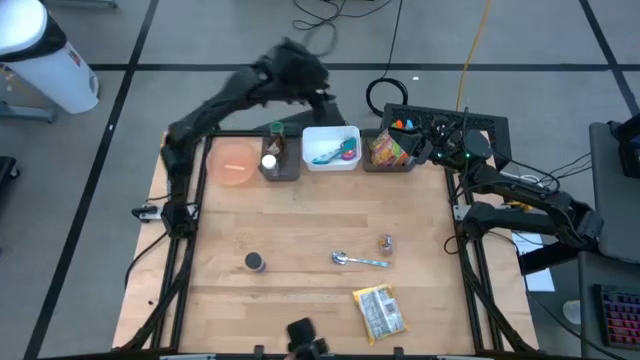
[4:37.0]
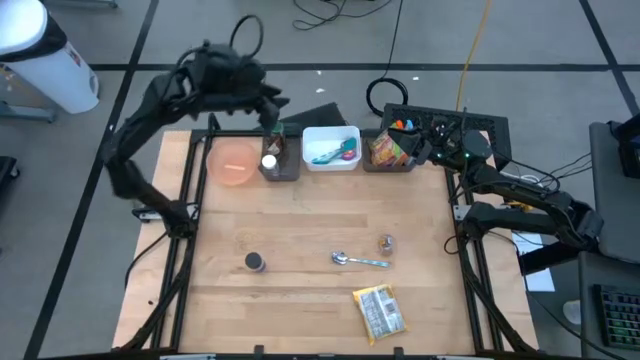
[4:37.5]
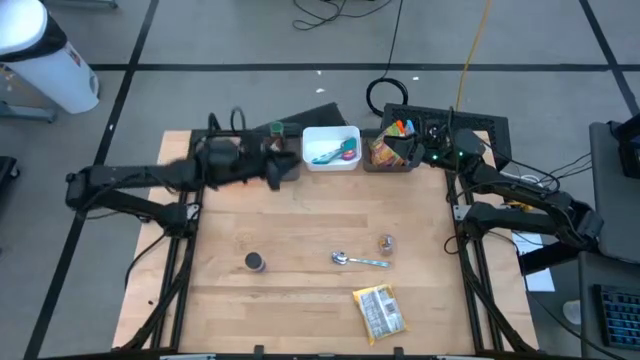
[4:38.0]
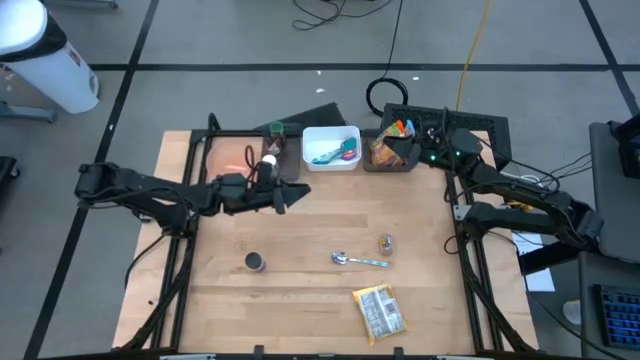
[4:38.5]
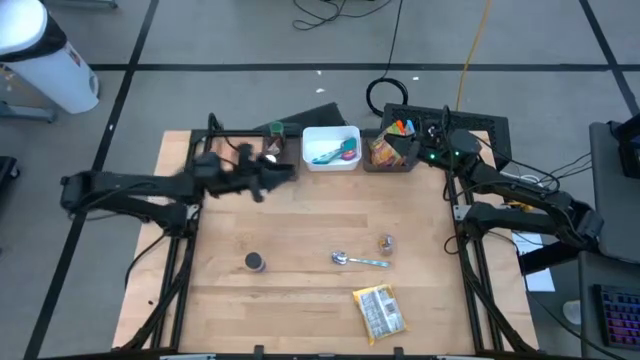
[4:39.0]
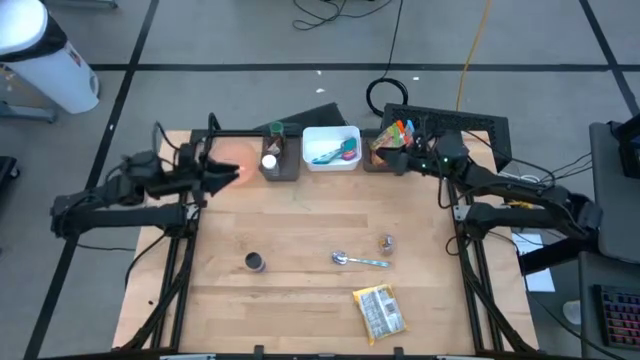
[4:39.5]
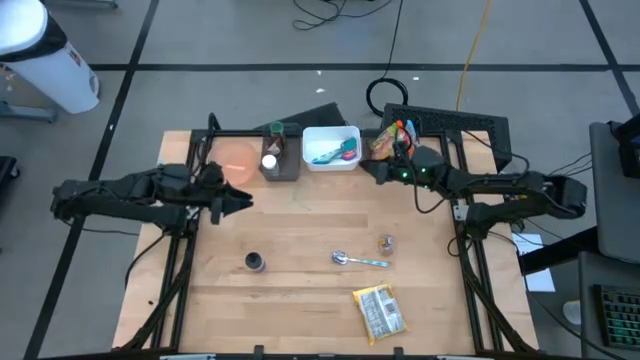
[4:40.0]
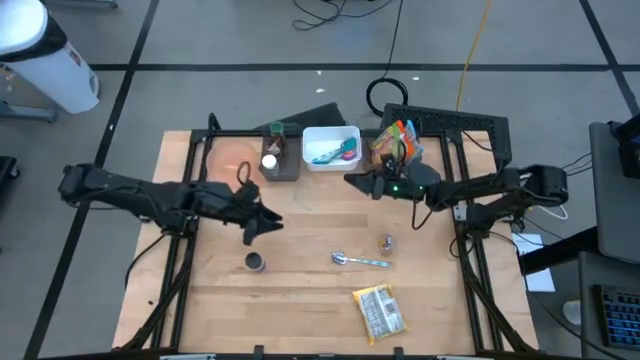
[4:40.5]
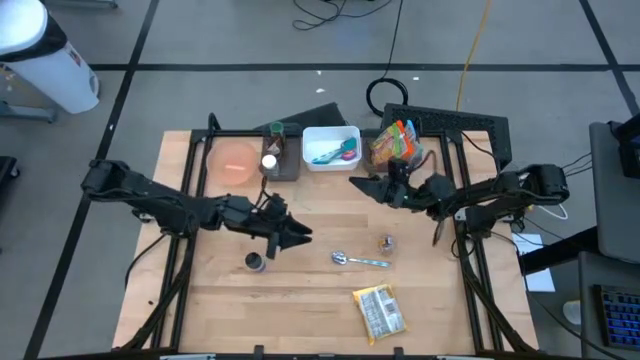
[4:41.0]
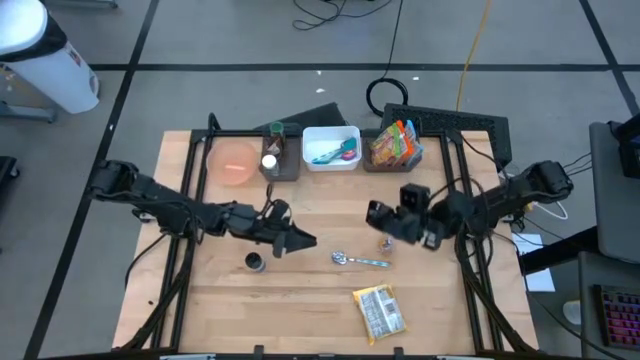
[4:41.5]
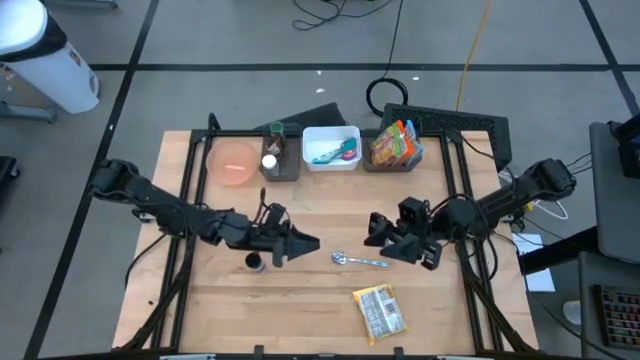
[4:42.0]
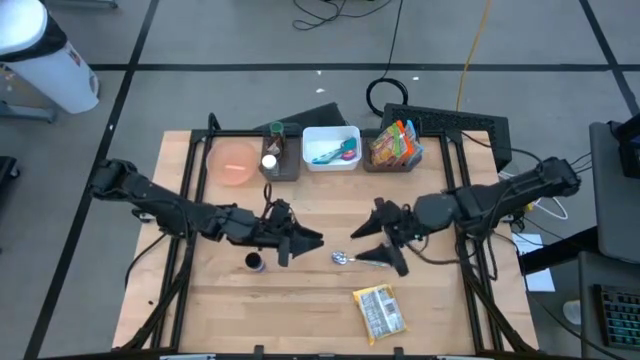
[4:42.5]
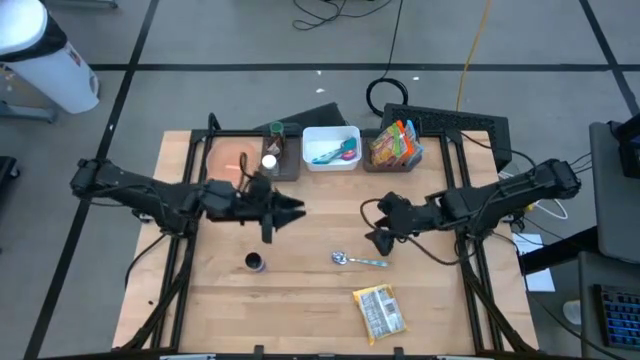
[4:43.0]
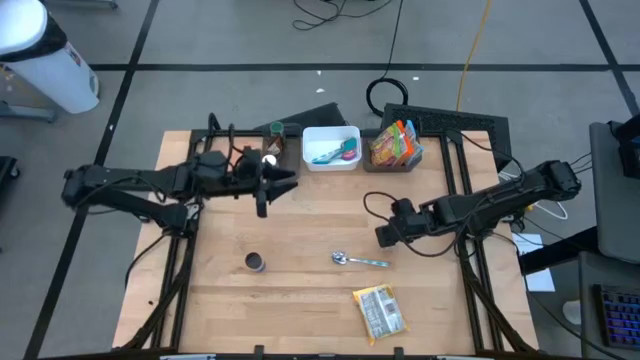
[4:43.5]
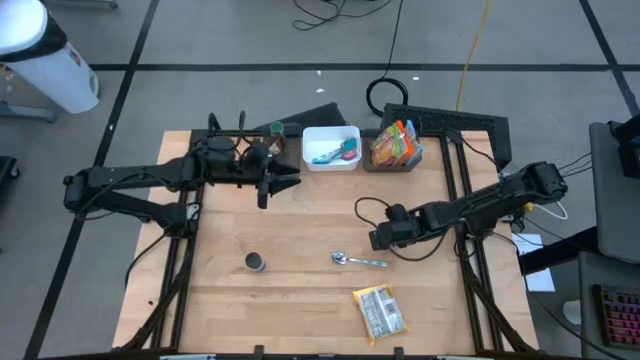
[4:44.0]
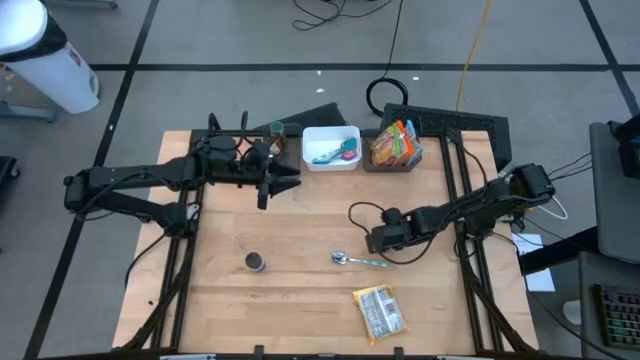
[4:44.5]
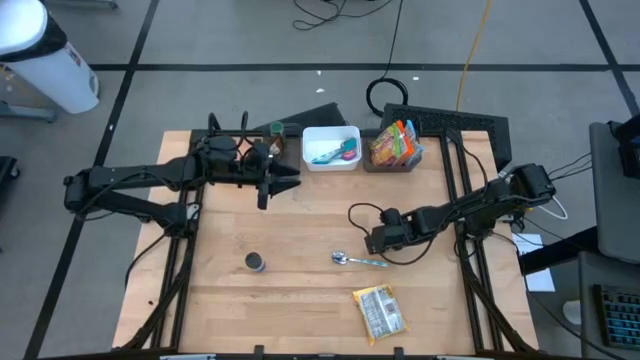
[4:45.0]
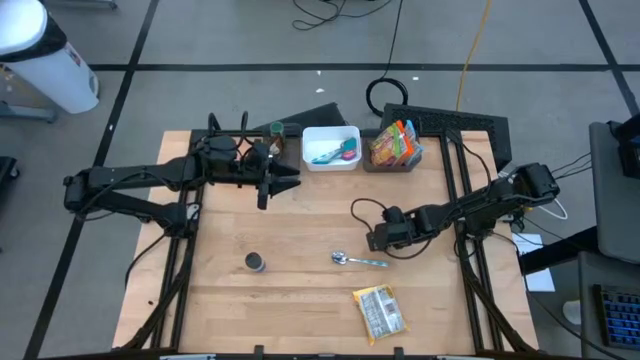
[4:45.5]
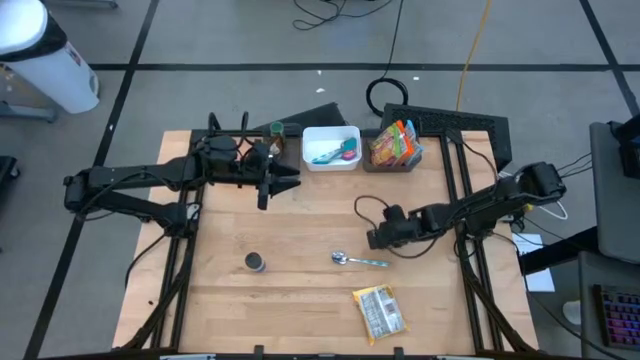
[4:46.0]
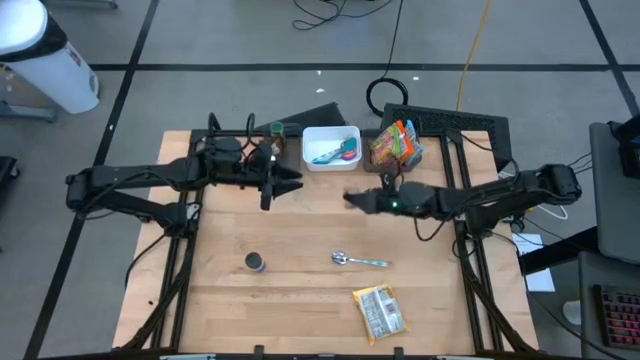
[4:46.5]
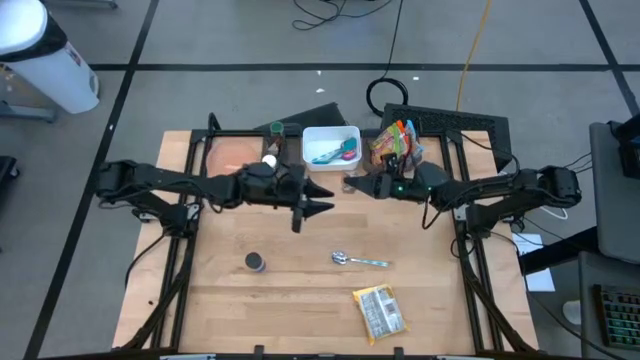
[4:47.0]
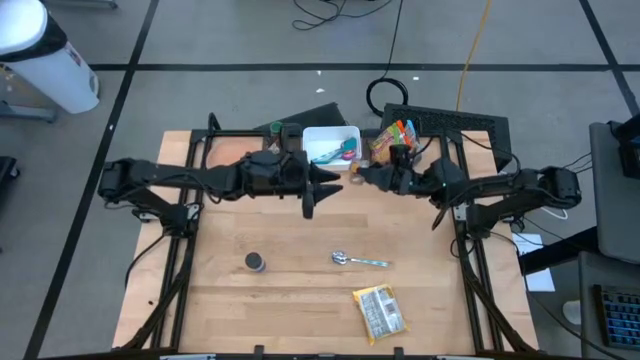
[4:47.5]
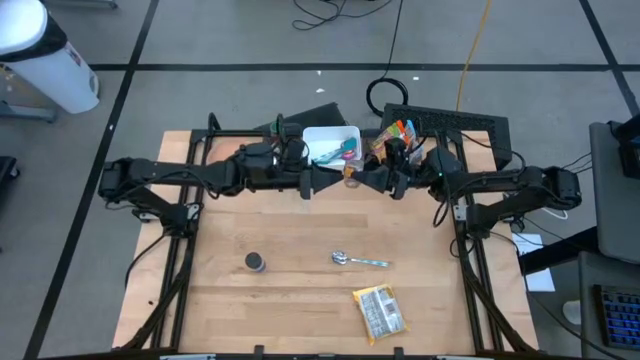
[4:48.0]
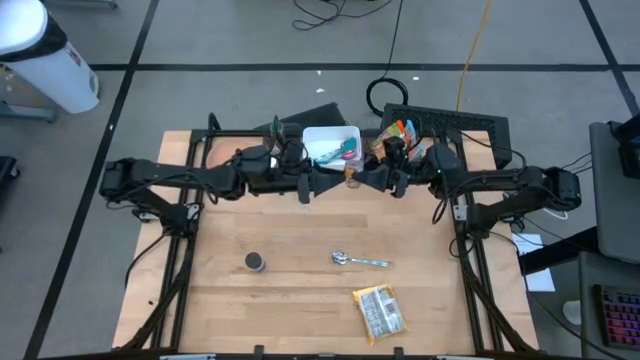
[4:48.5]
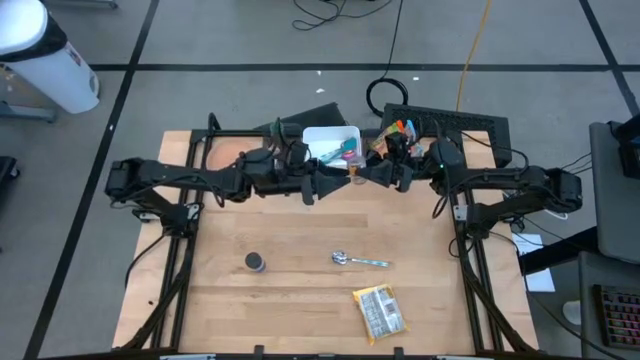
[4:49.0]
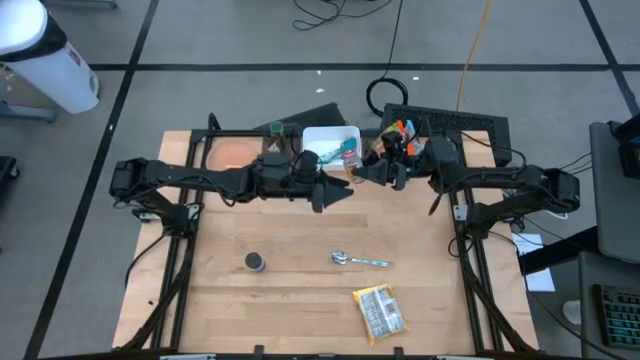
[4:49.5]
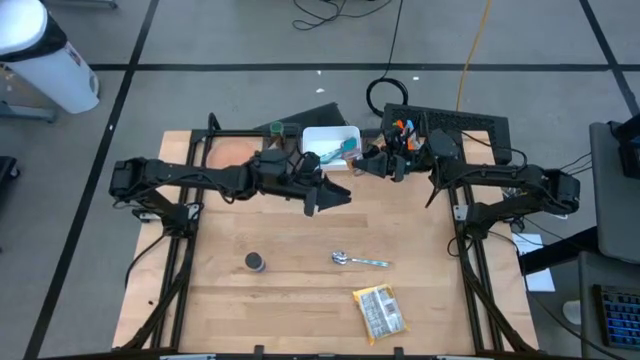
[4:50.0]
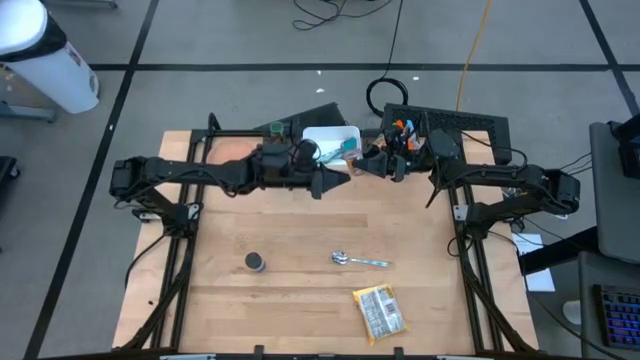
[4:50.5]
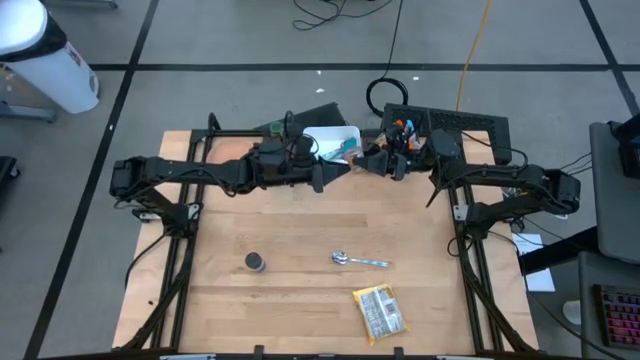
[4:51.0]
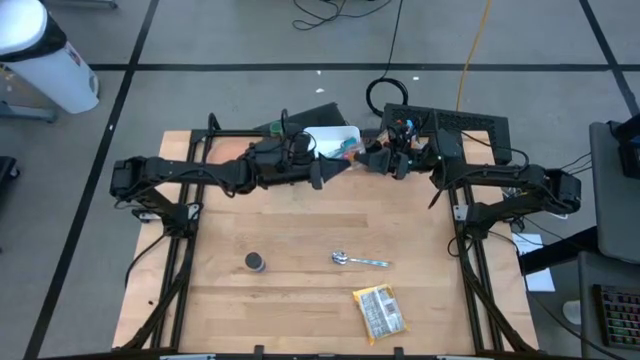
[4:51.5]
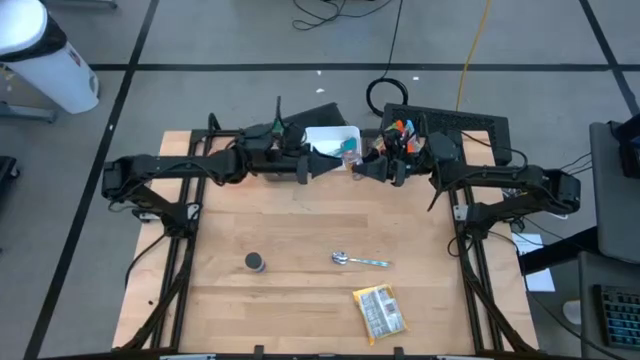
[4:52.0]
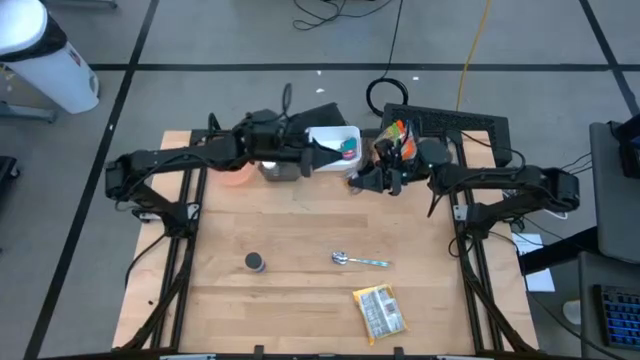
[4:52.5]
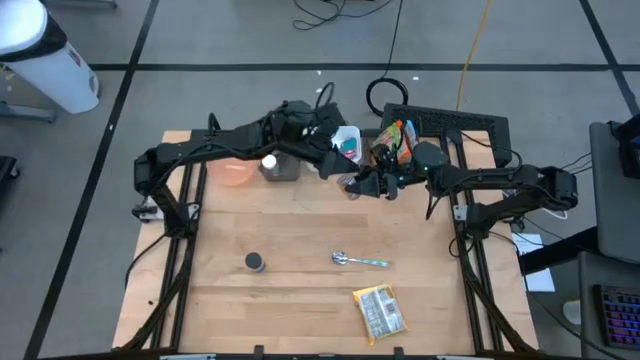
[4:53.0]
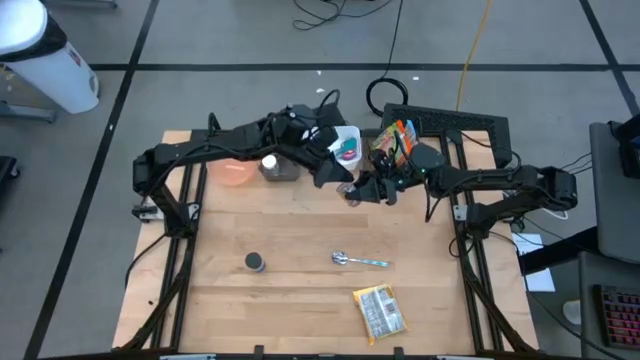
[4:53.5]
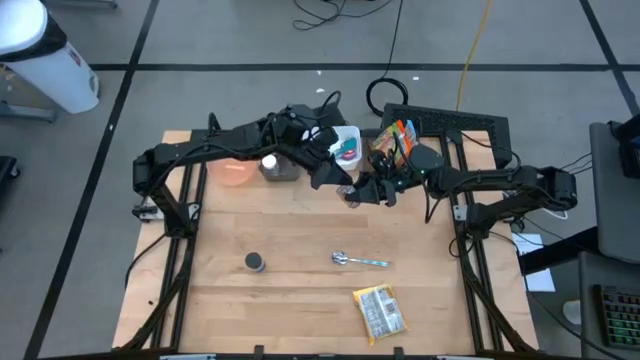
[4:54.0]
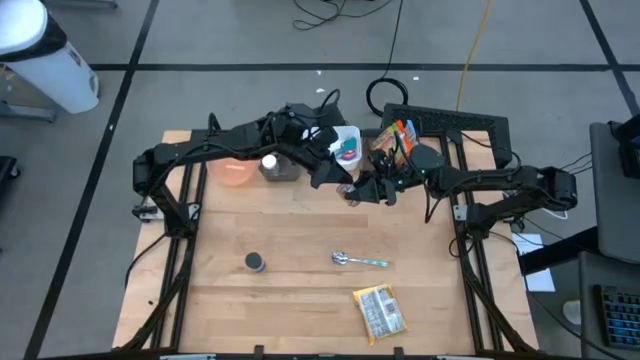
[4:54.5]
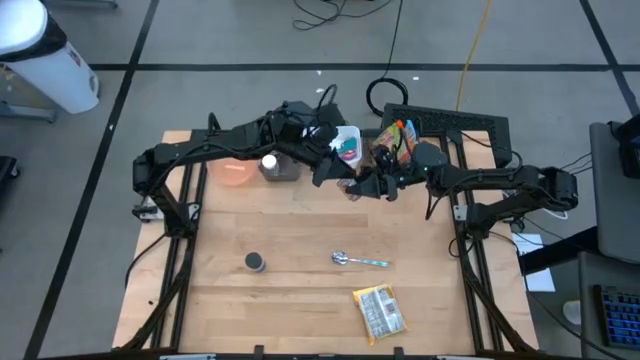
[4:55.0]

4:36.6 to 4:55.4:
Task: Pick & Place Food Item
Put the brown seasoning bottle into the left black bin
